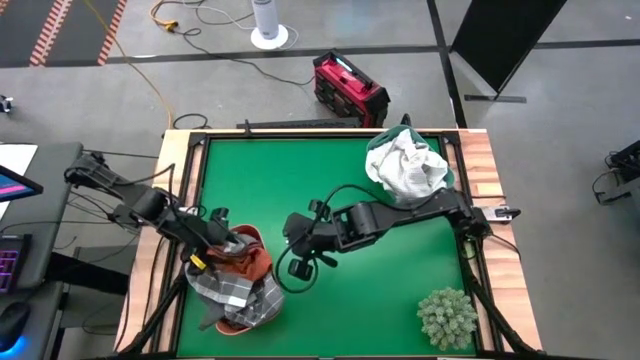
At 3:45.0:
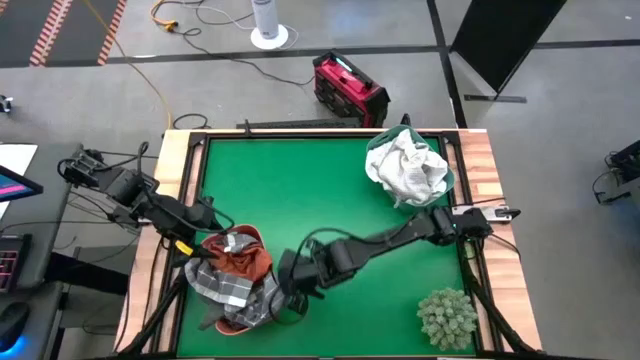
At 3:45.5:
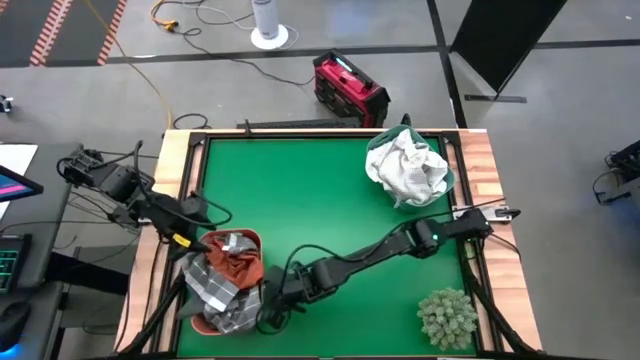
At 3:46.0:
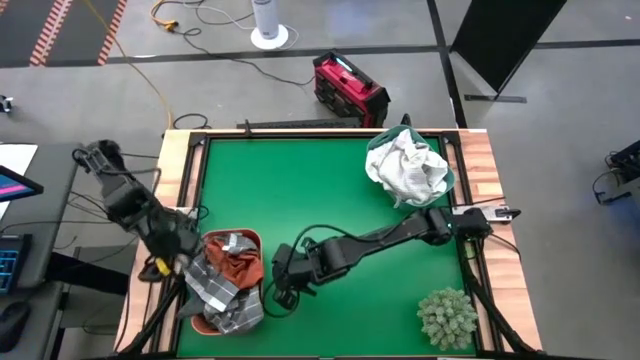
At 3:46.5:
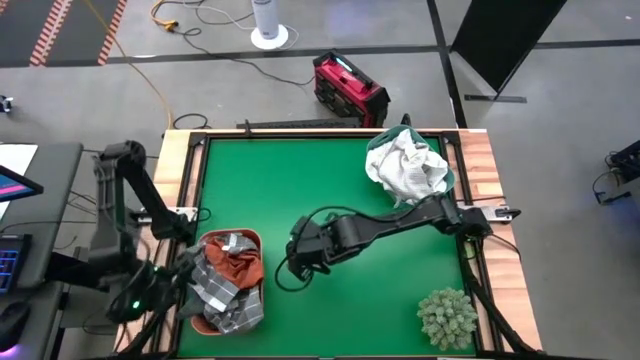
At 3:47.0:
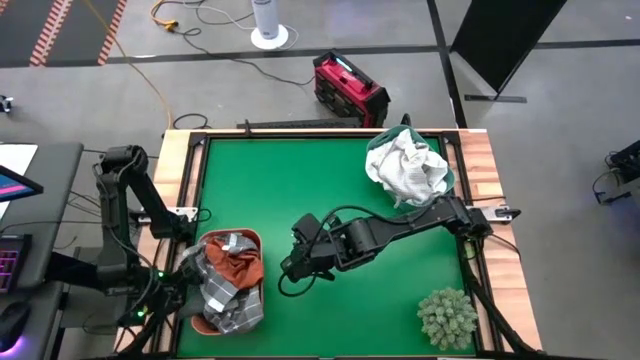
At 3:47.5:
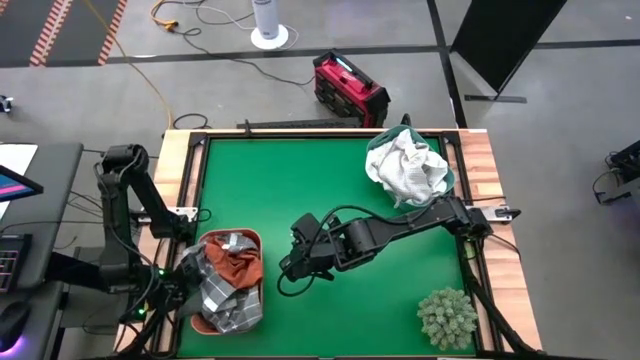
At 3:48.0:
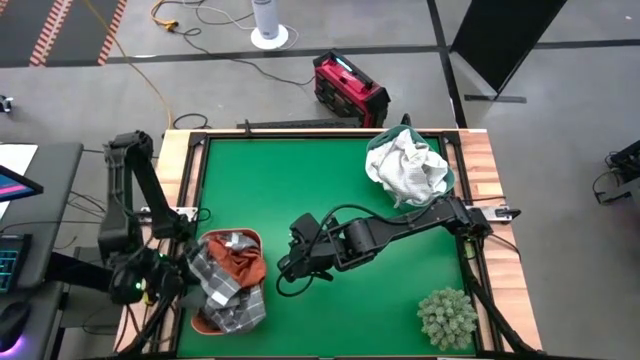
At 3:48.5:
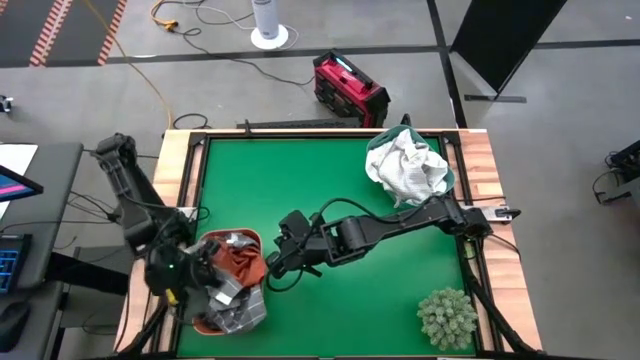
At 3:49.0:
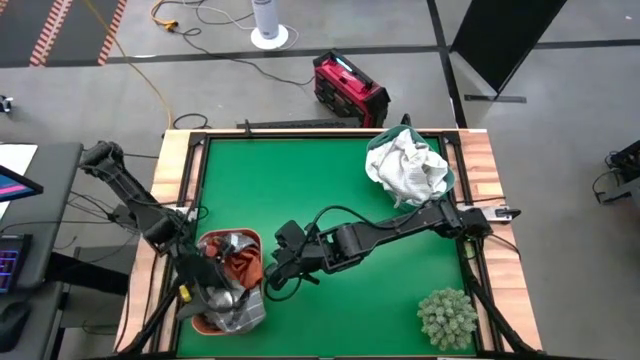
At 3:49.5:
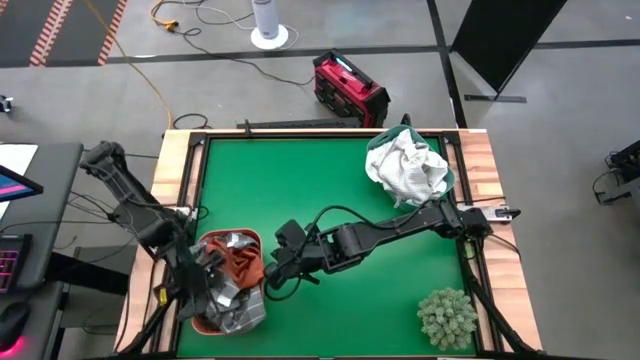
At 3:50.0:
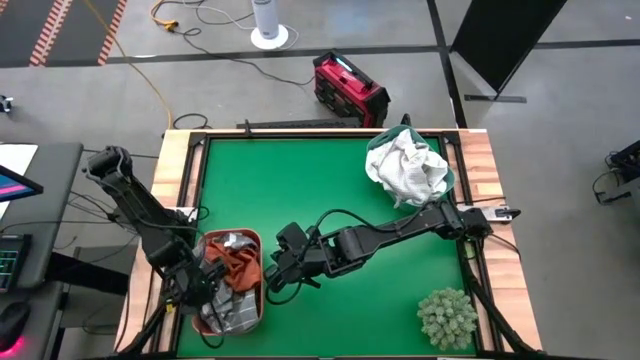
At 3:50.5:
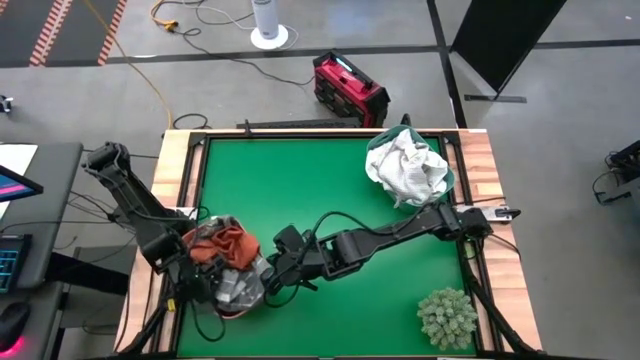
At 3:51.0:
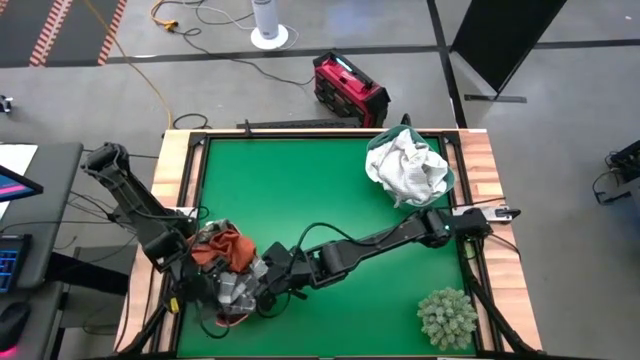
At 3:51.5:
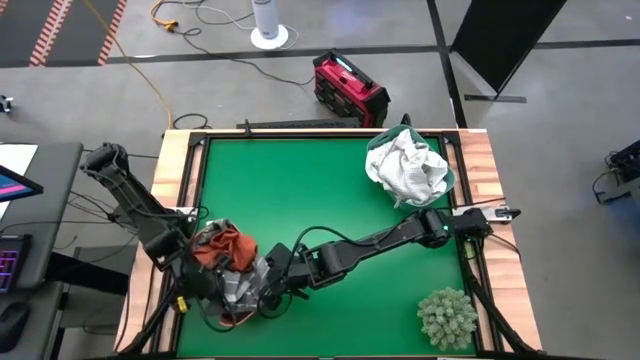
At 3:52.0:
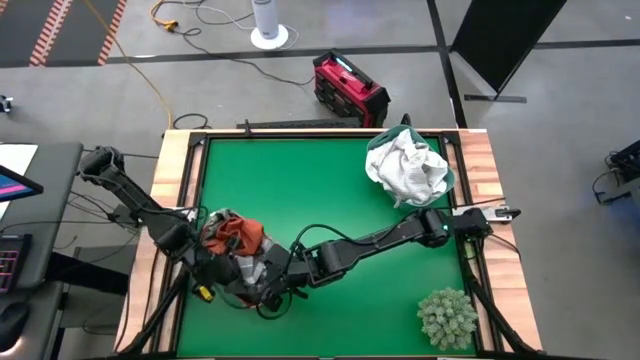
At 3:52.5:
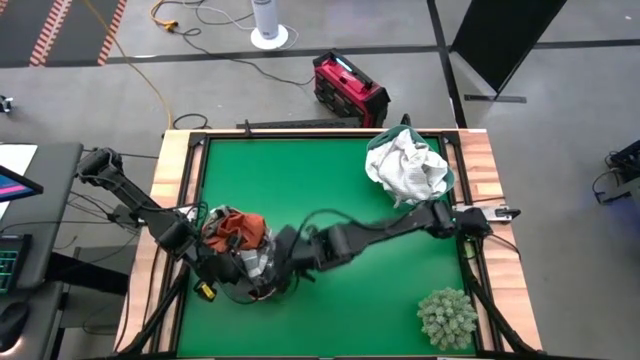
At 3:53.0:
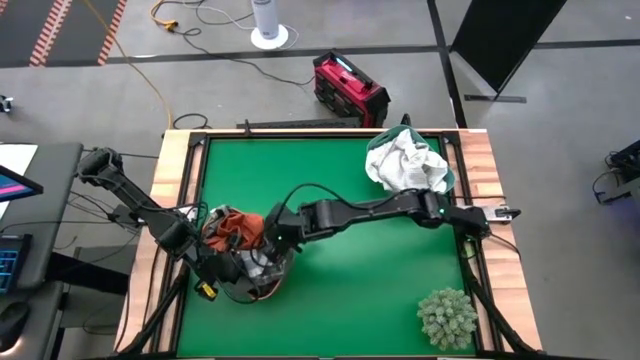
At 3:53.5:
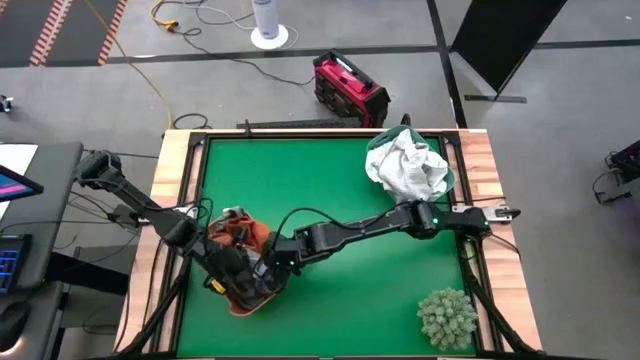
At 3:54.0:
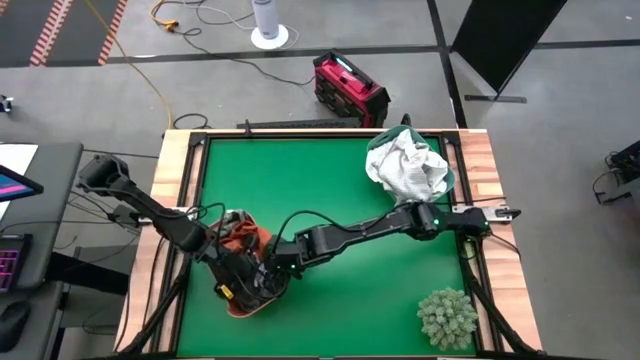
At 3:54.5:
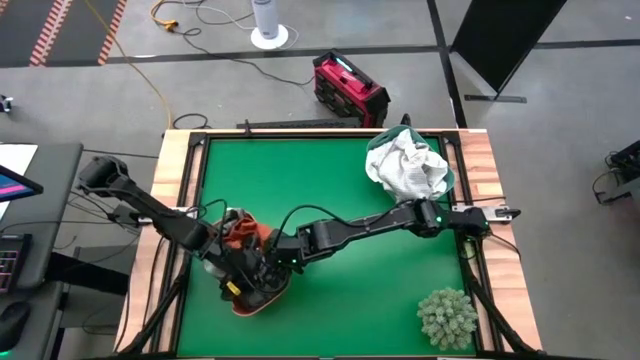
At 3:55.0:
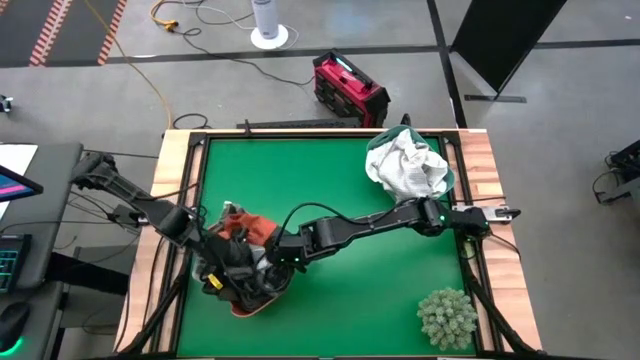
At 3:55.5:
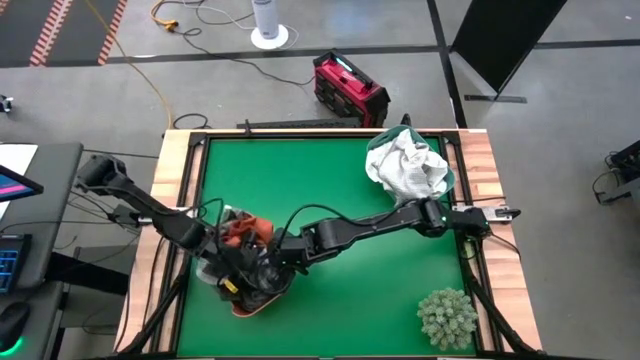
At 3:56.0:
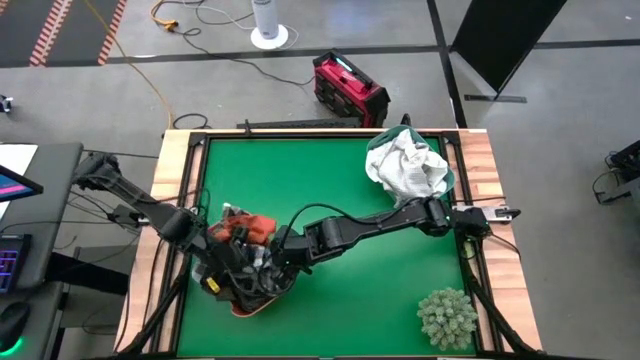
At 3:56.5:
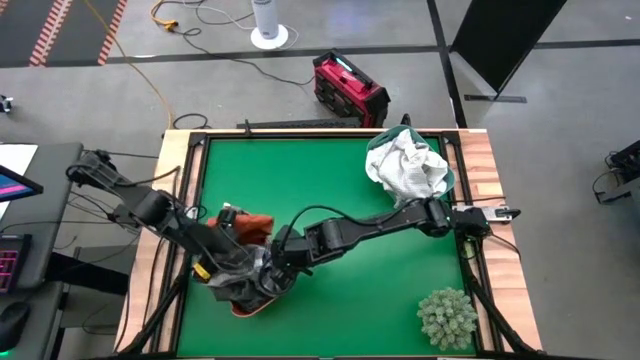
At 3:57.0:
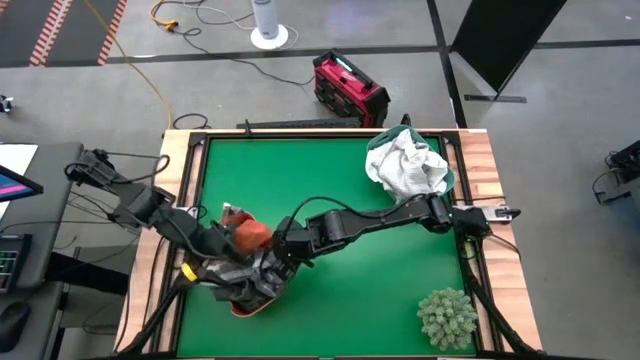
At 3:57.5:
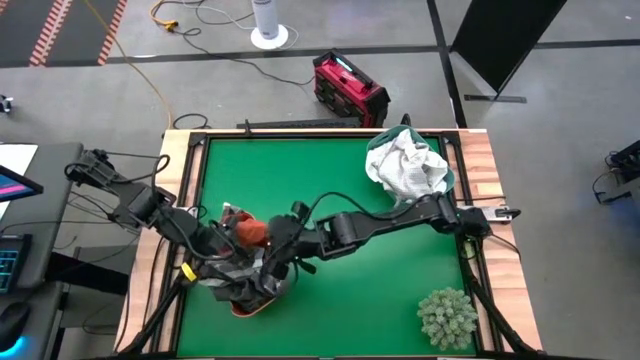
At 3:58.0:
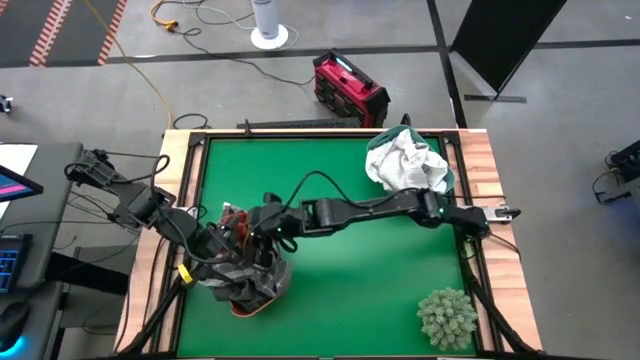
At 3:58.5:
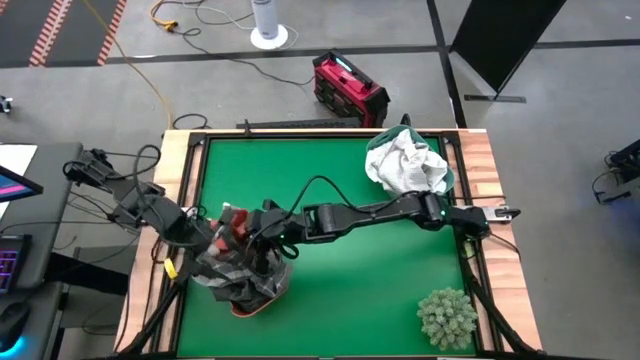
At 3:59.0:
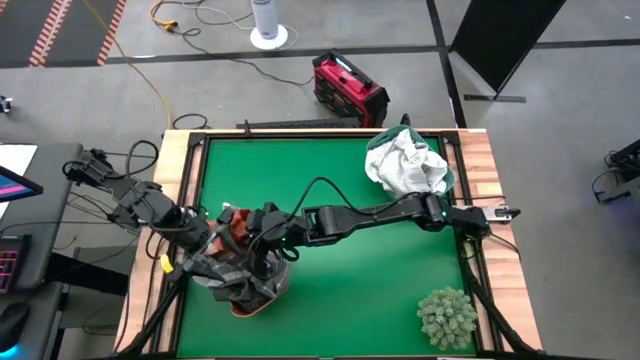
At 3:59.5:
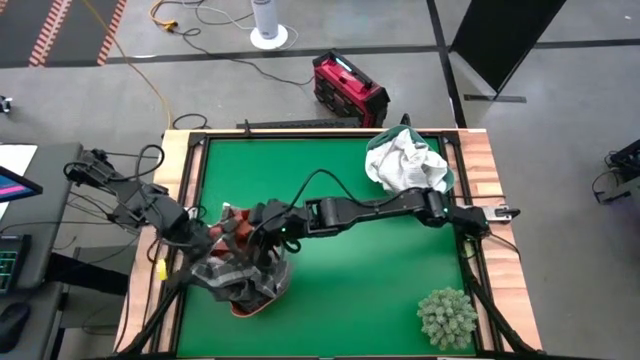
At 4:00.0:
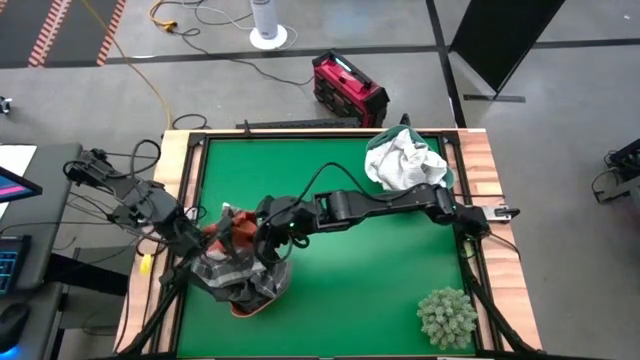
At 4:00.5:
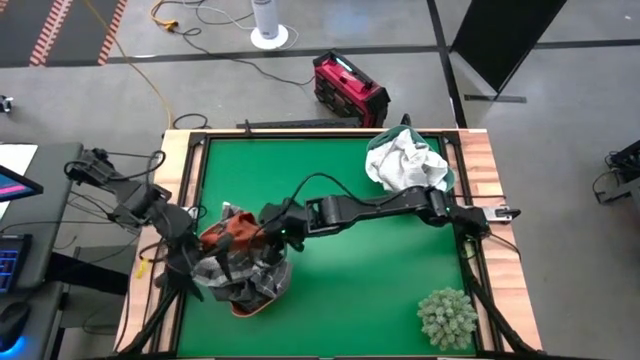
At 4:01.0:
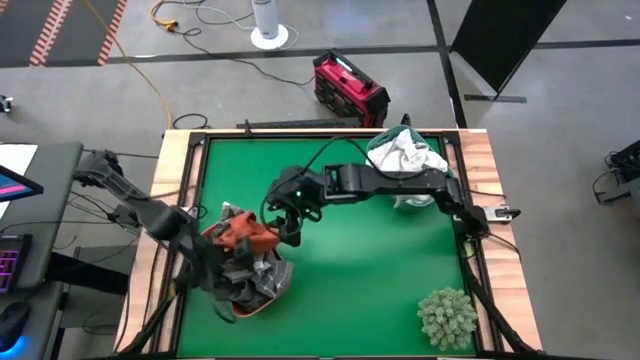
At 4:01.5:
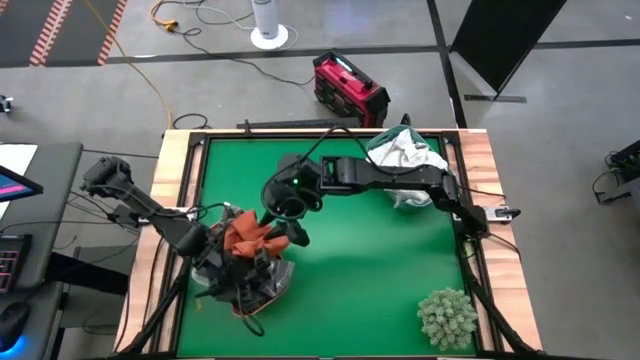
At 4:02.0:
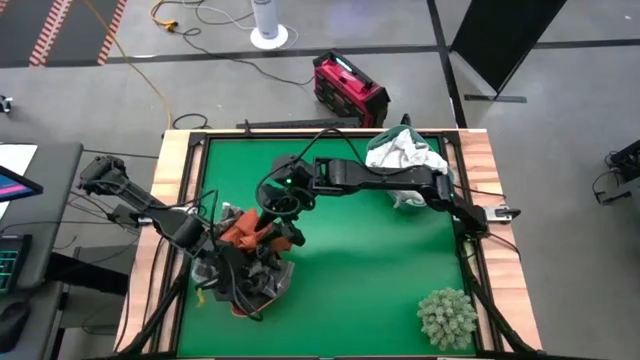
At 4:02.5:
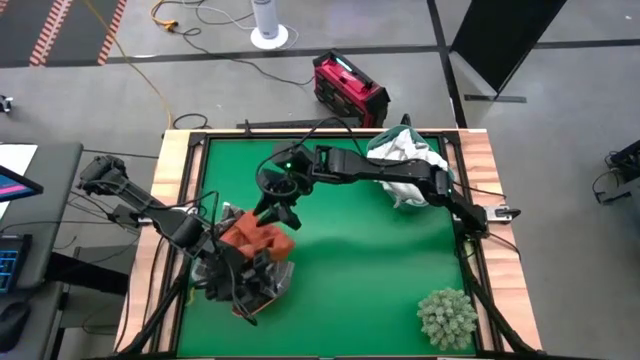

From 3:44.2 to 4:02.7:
Task: Sort towels by color in basket
Adjust the towels in the orange bin
